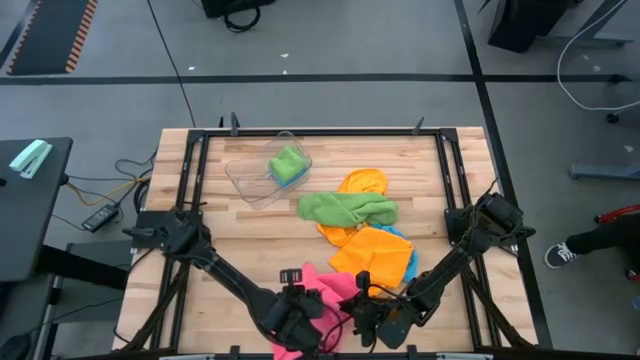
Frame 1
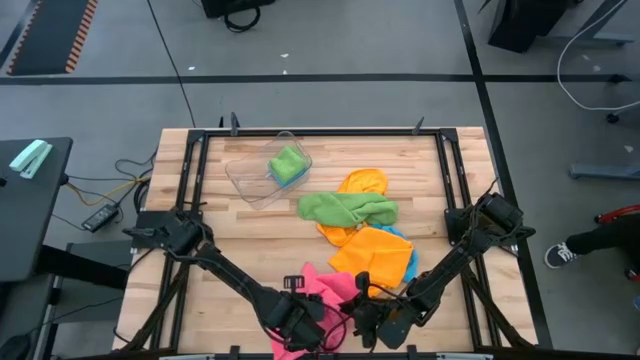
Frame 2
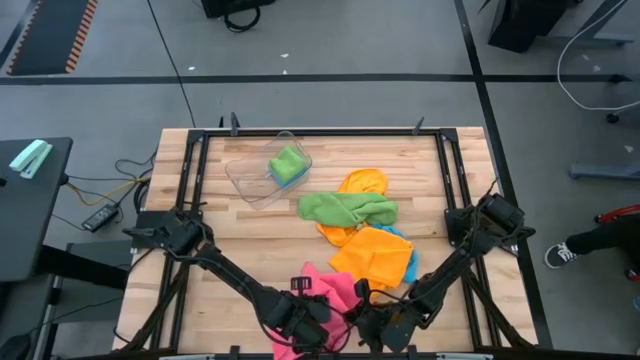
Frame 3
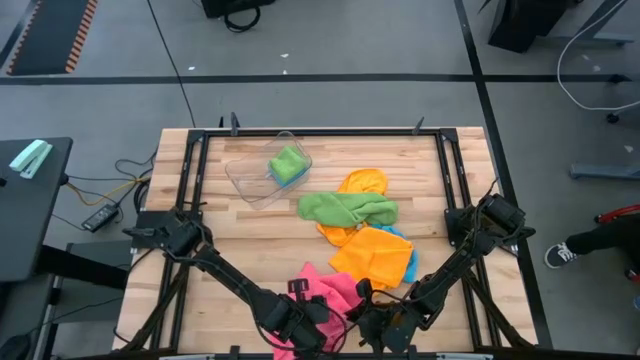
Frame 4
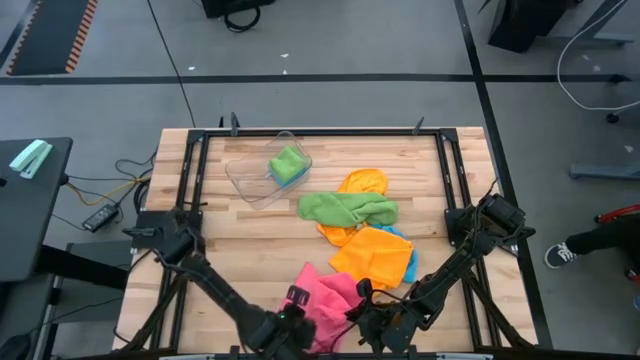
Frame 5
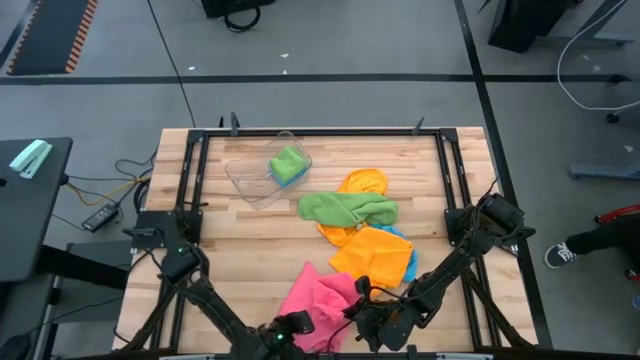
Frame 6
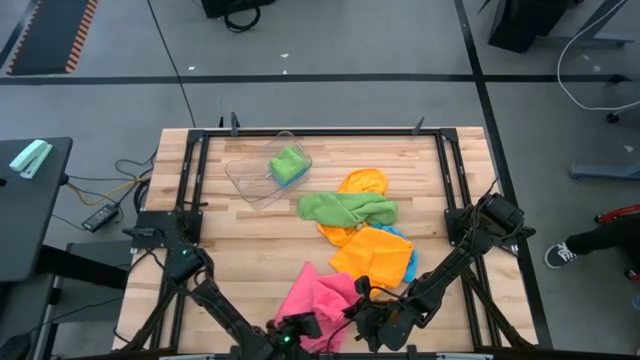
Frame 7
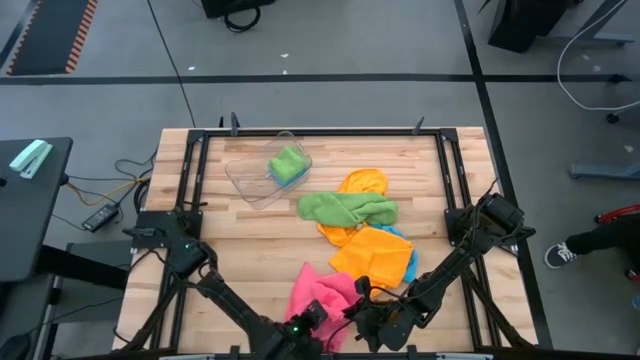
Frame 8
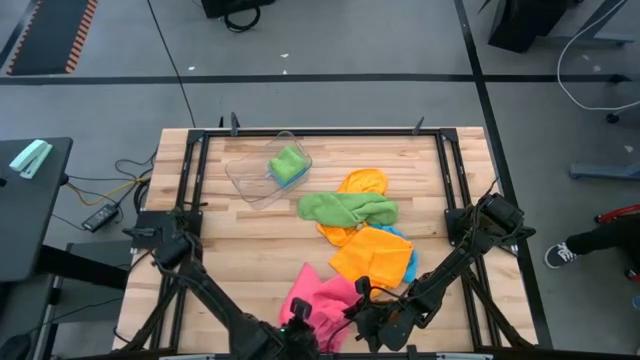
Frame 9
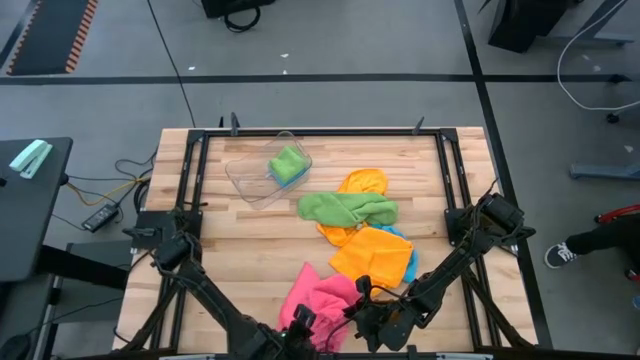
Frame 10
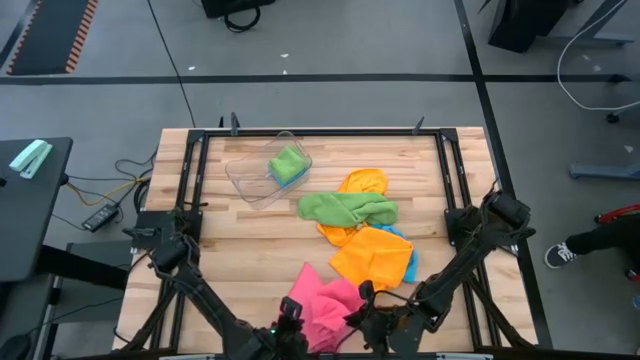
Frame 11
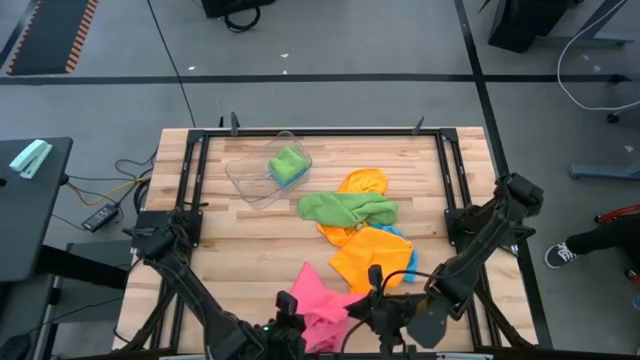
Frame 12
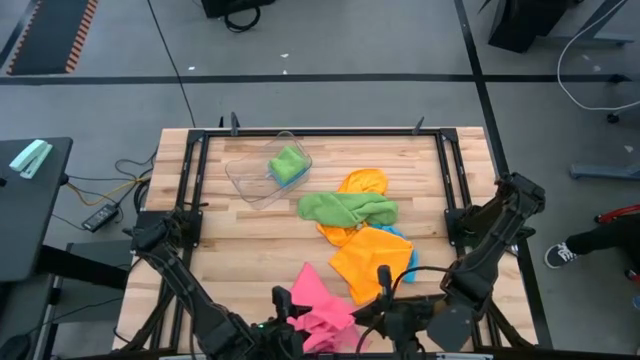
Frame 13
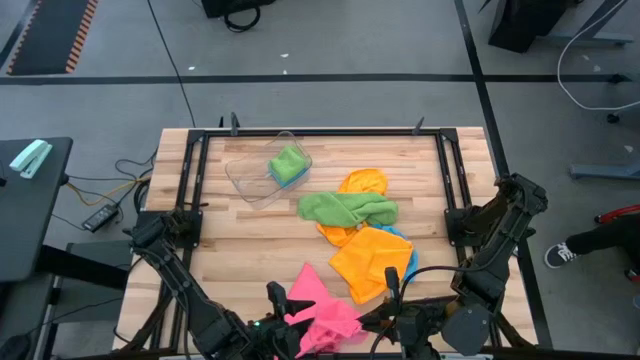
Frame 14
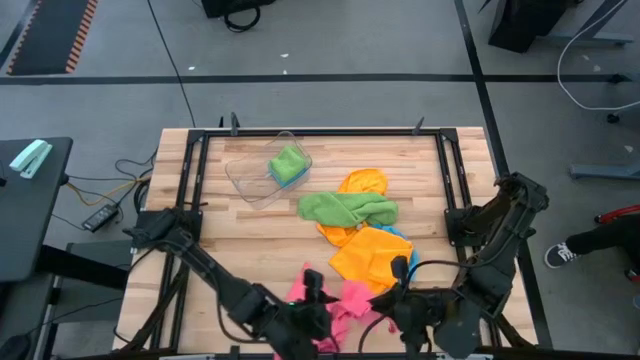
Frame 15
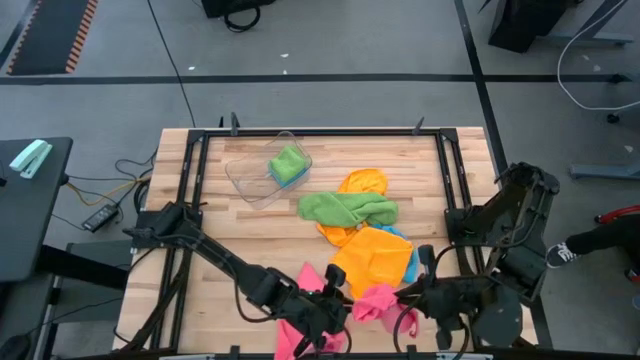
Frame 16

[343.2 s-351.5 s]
Task: Fold microfiber towels
Fold the left pink microfiber towel

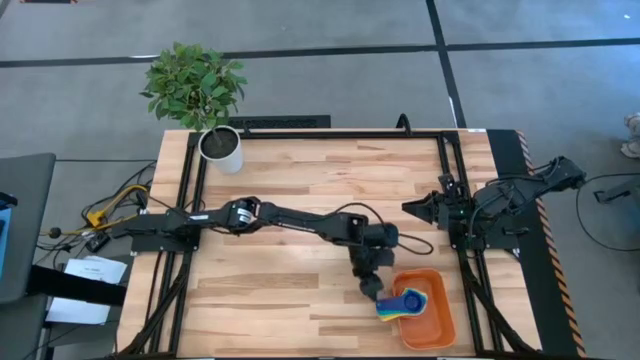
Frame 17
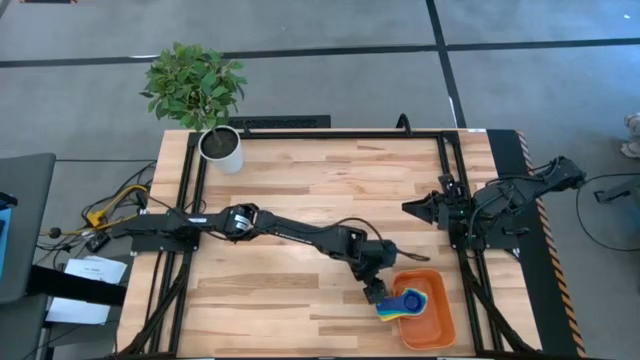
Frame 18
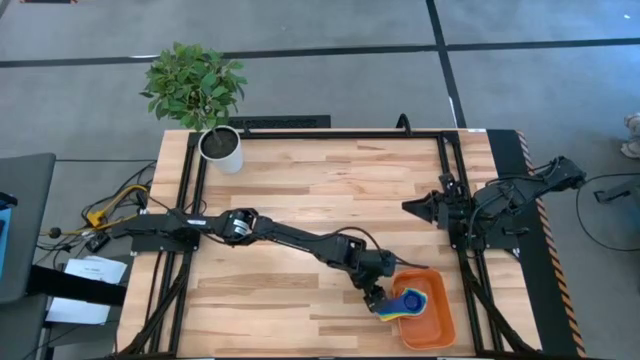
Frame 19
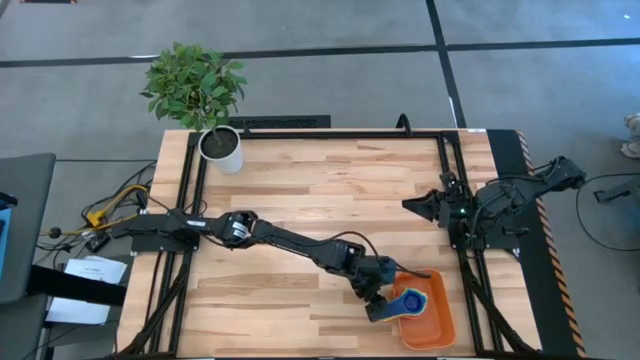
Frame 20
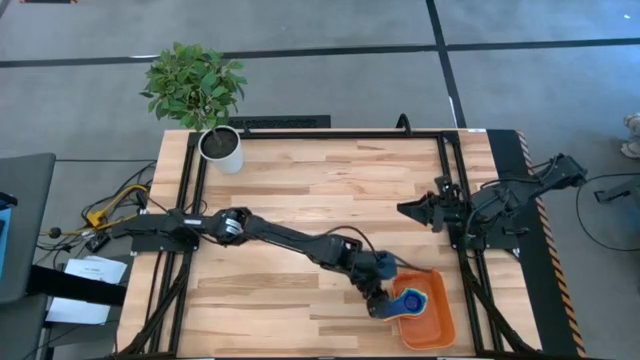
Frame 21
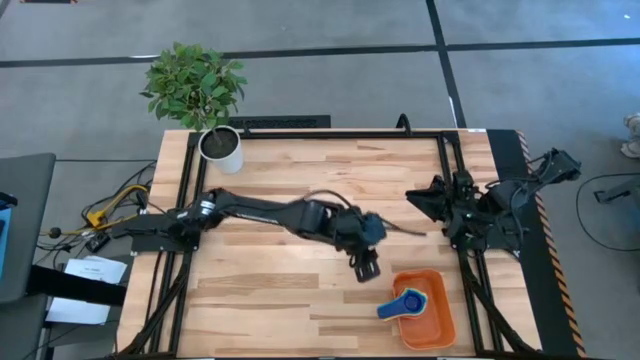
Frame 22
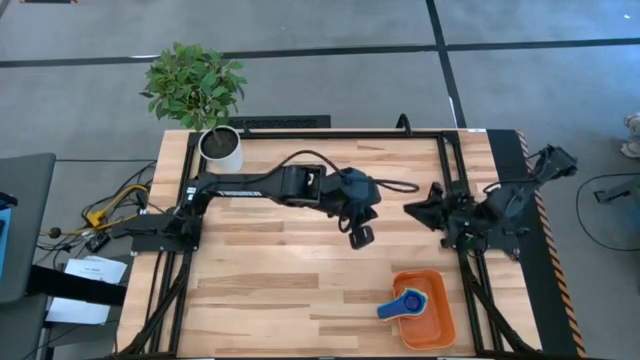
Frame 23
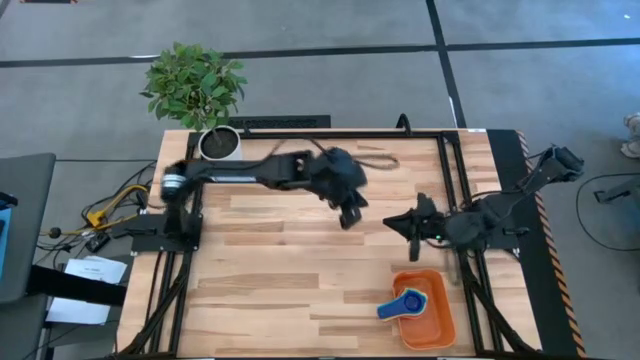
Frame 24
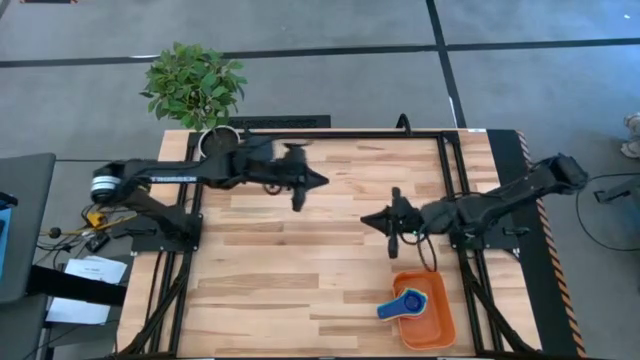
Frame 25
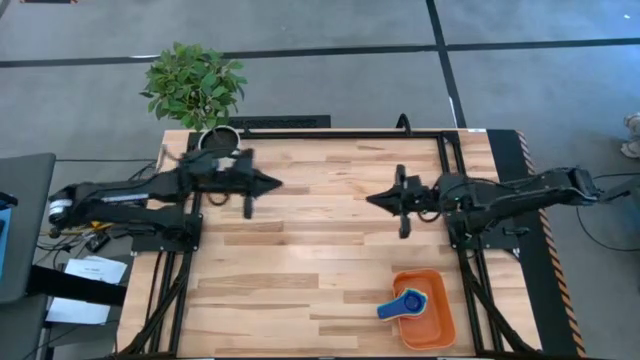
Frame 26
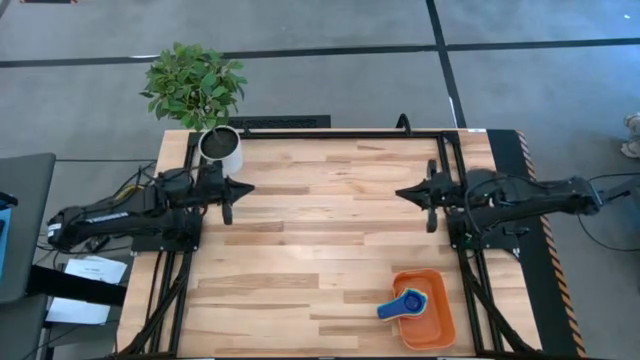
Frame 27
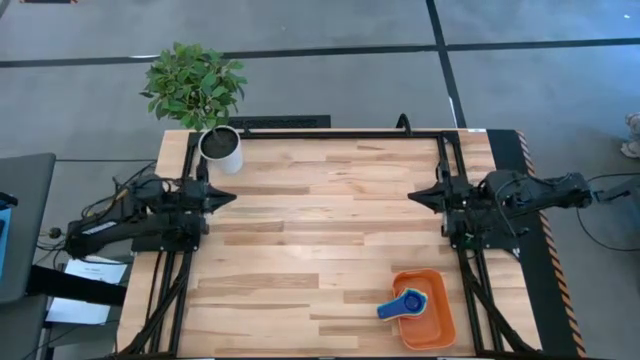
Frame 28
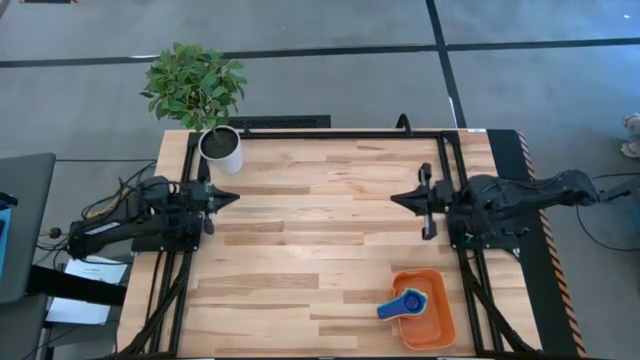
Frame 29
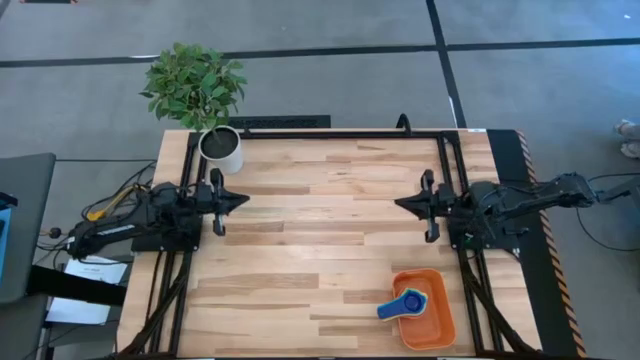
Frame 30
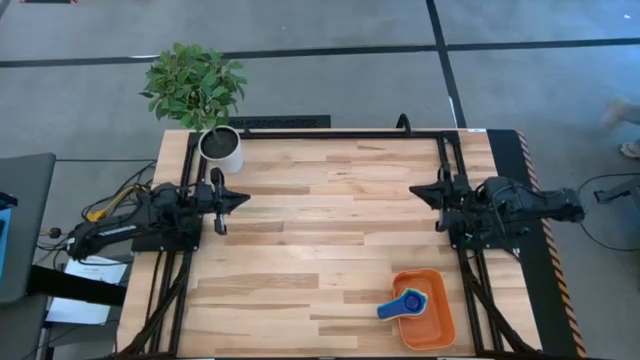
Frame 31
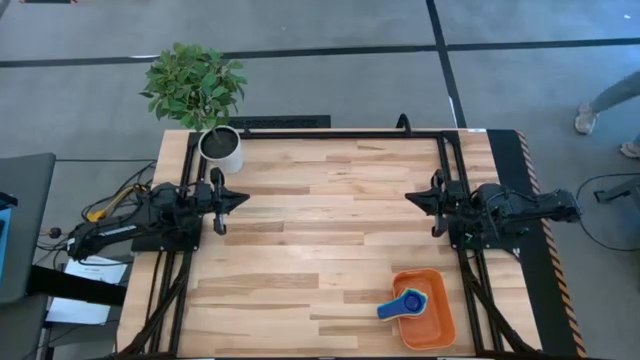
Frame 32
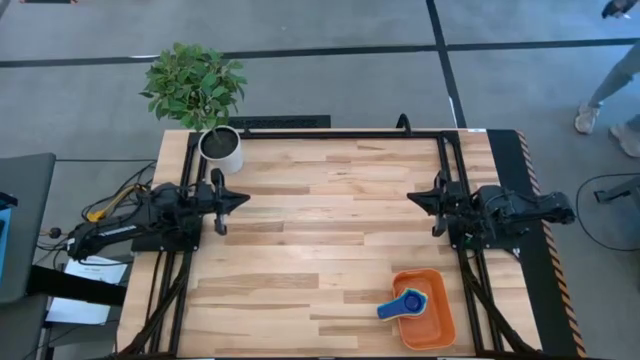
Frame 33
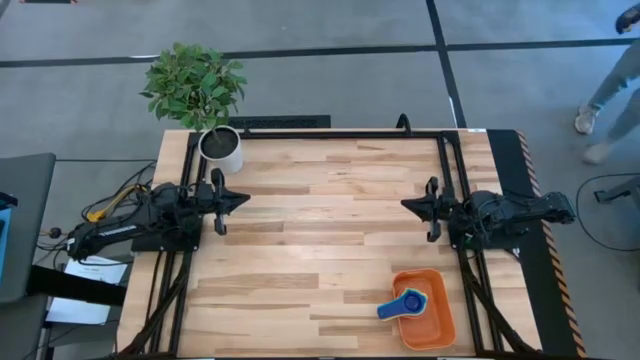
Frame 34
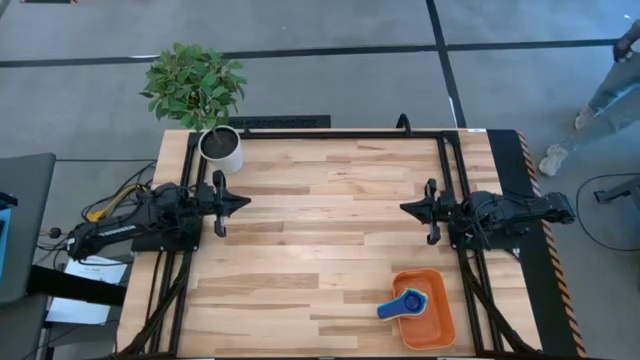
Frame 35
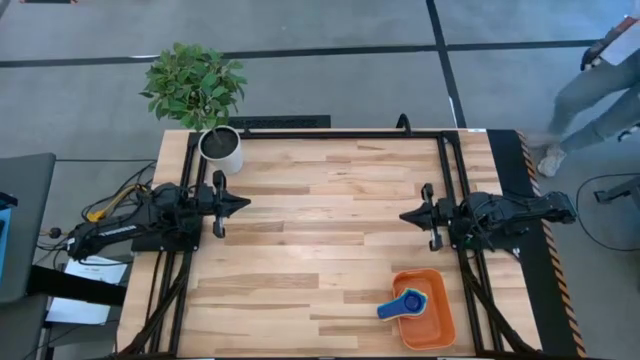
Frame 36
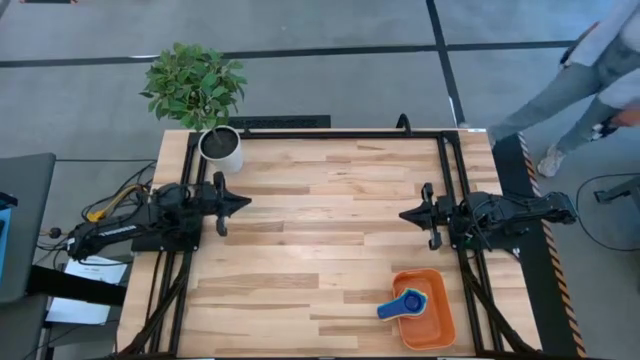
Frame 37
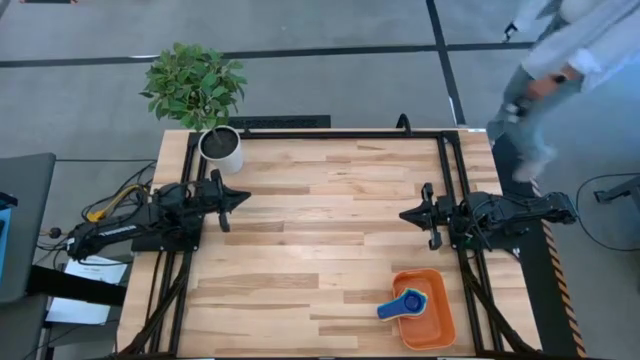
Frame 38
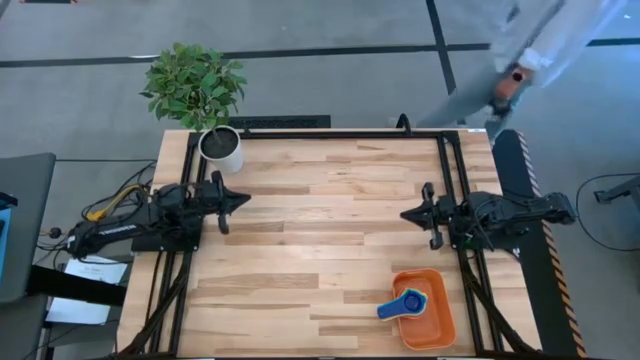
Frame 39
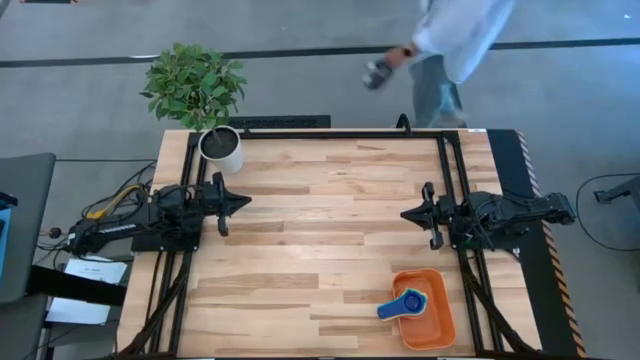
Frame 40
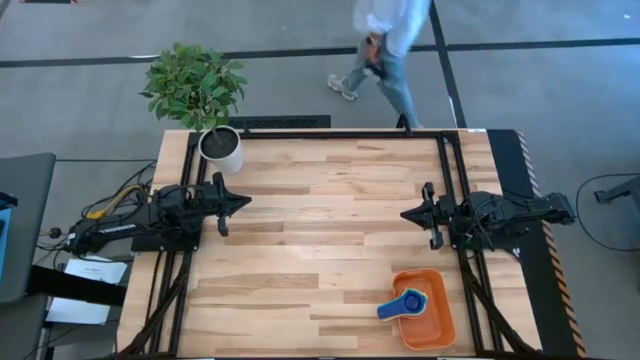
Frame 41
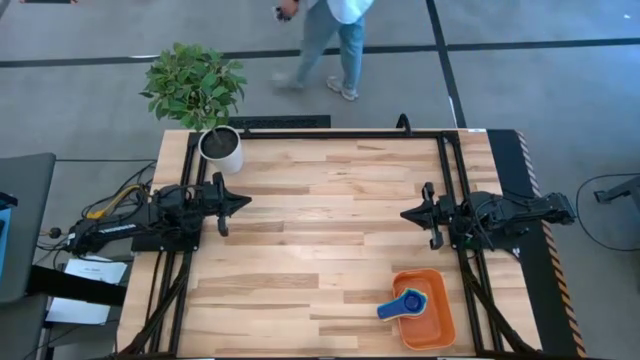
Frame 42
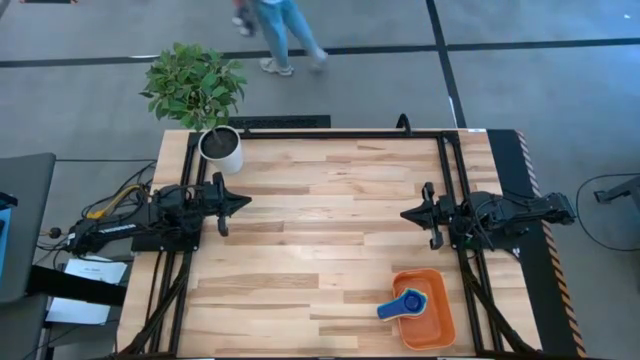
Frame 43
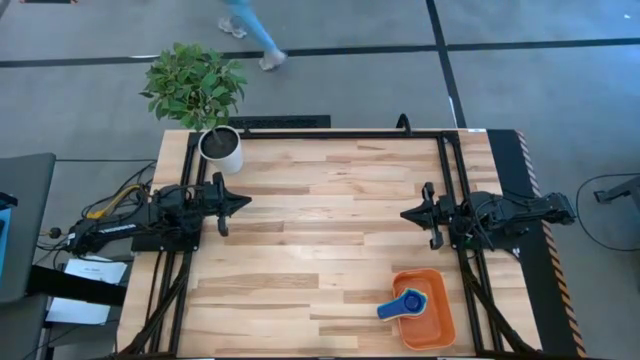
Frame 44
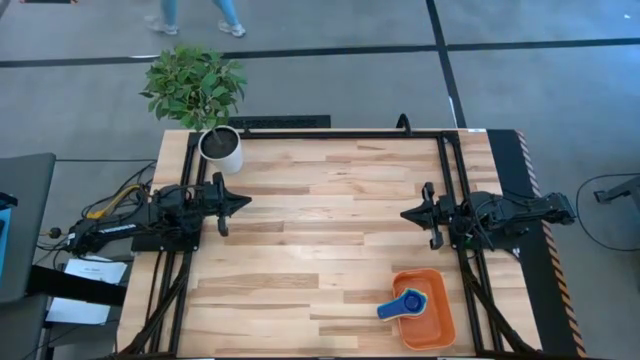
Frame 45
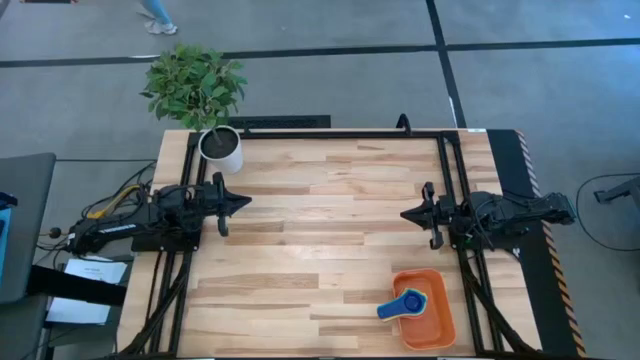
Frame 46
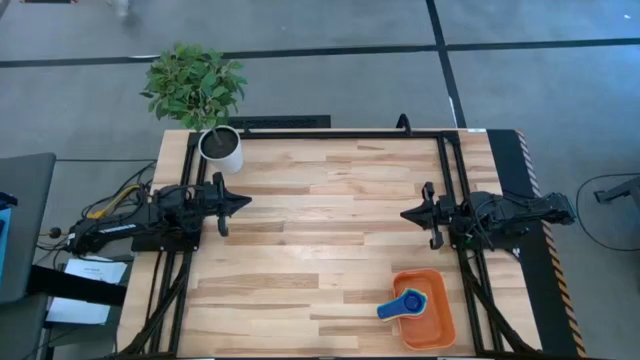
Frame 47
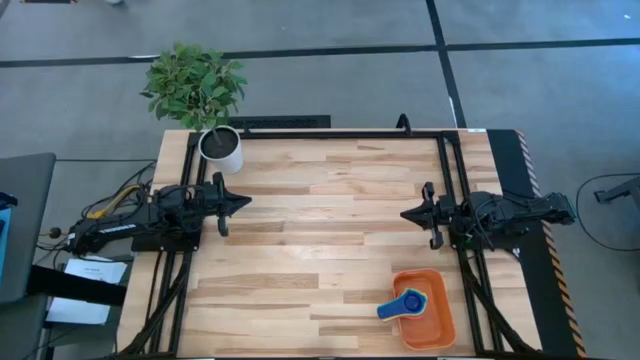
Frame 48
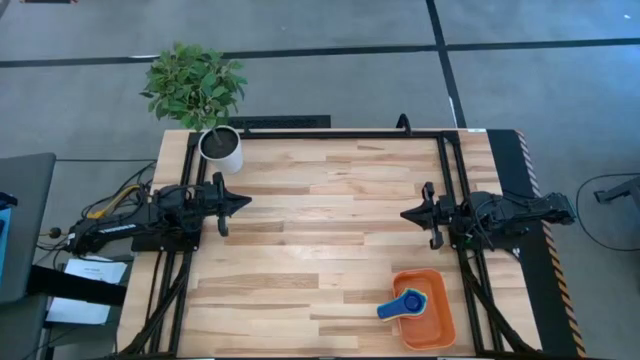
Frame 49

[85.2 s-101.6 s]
Task: Nest measuring cups in basket
Return to Home Position
